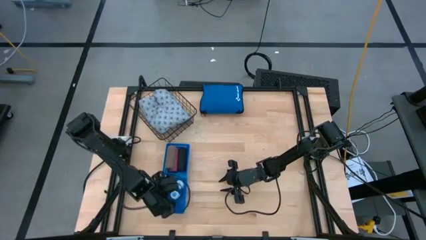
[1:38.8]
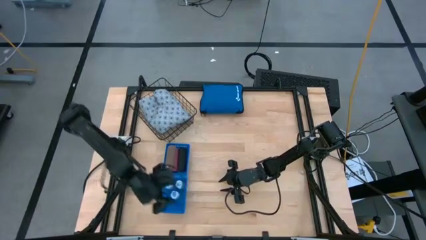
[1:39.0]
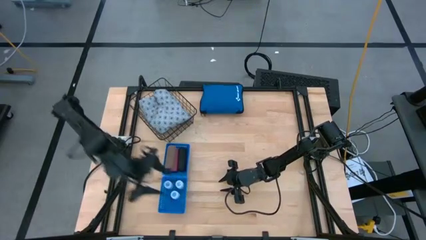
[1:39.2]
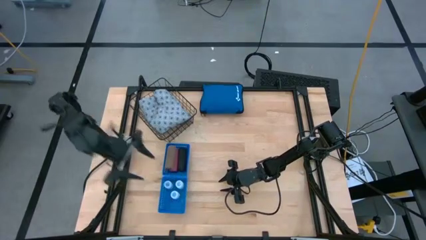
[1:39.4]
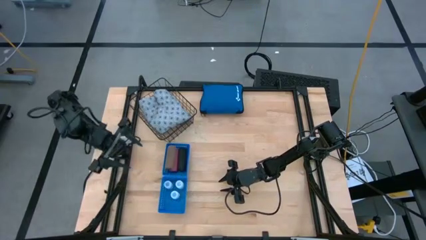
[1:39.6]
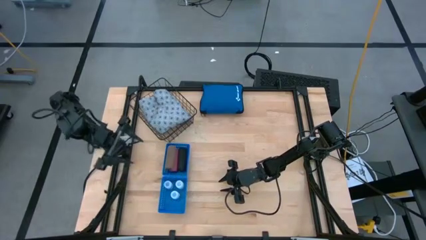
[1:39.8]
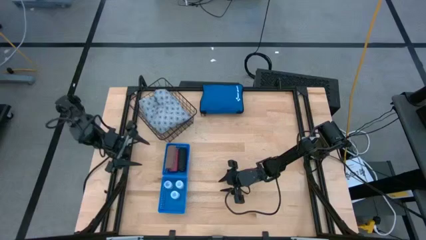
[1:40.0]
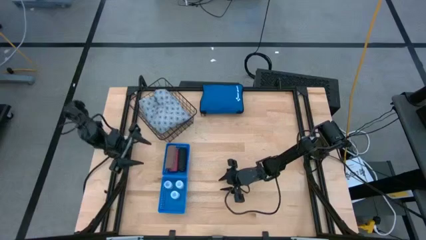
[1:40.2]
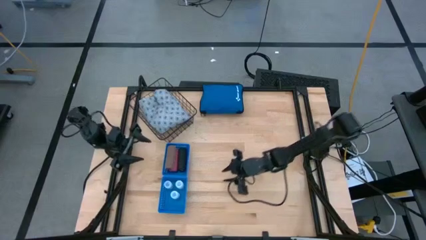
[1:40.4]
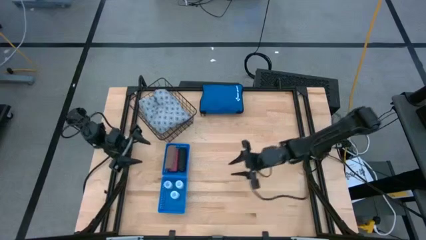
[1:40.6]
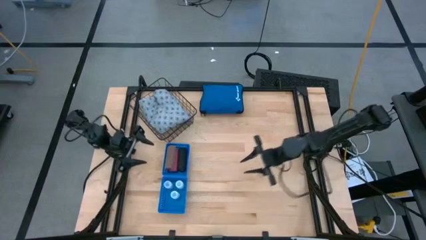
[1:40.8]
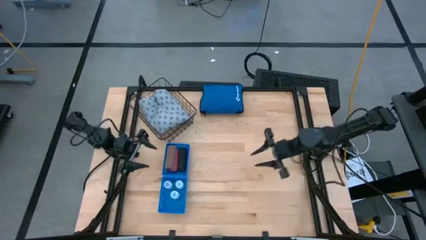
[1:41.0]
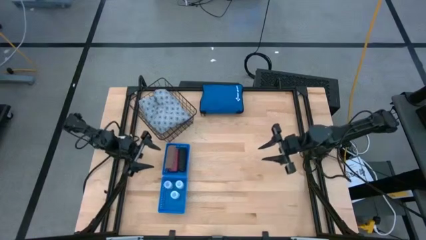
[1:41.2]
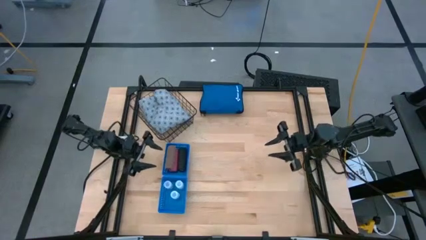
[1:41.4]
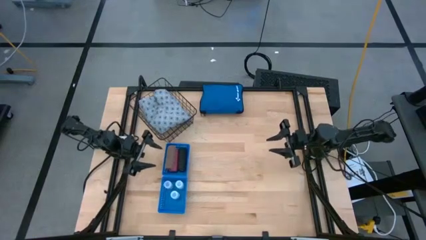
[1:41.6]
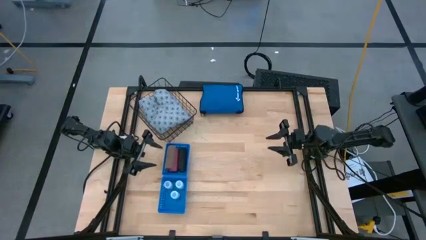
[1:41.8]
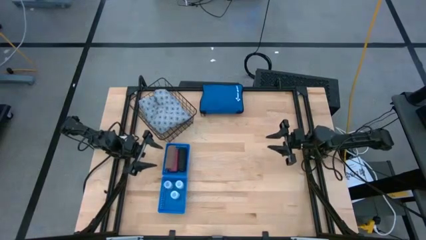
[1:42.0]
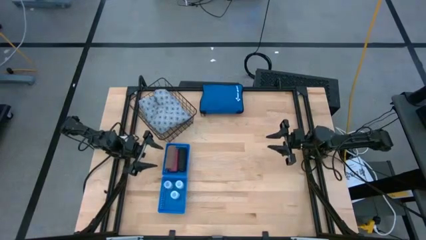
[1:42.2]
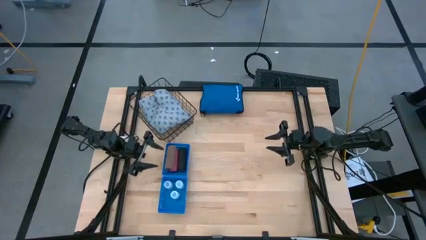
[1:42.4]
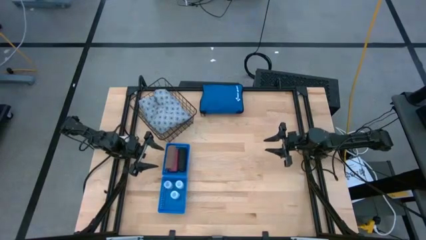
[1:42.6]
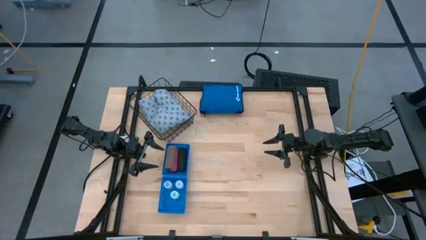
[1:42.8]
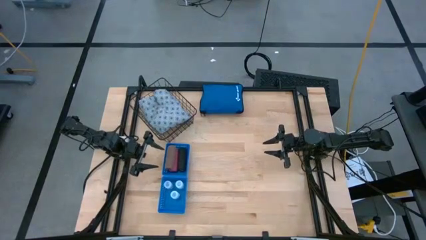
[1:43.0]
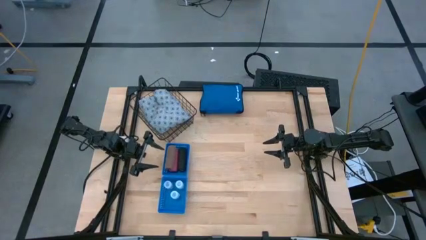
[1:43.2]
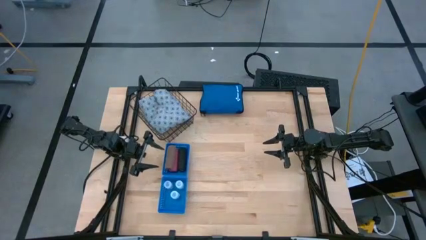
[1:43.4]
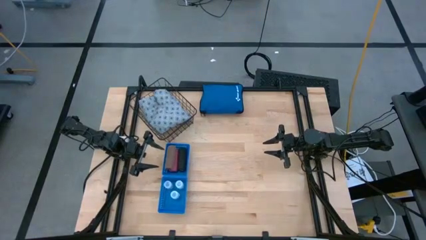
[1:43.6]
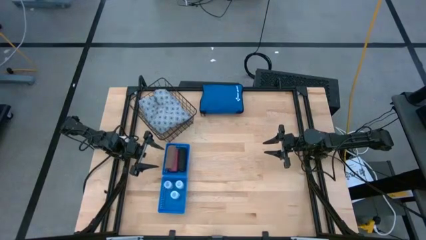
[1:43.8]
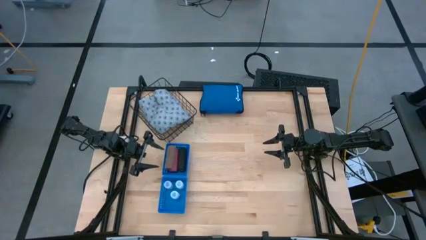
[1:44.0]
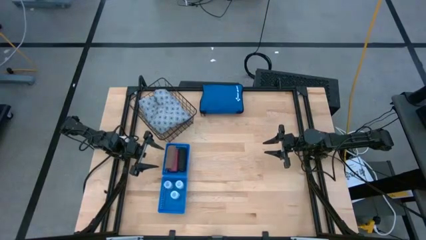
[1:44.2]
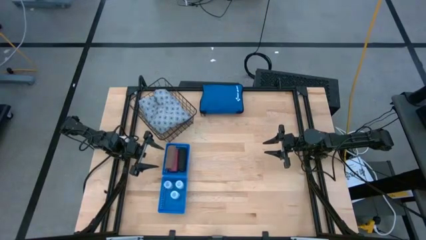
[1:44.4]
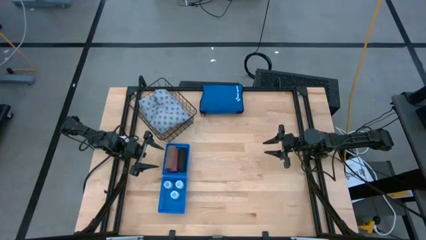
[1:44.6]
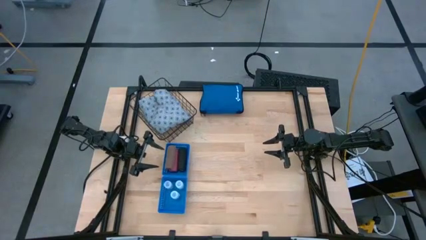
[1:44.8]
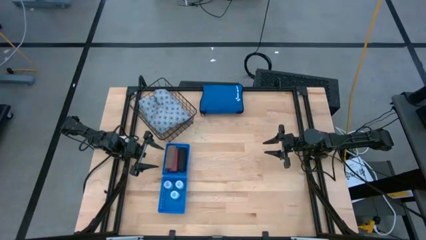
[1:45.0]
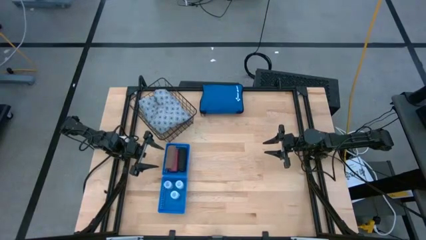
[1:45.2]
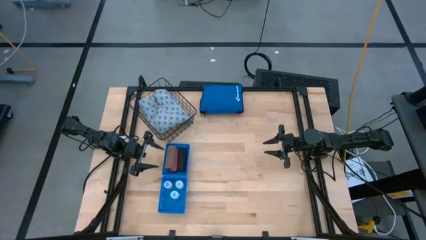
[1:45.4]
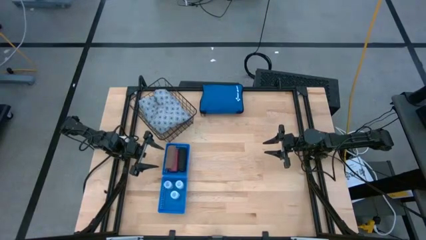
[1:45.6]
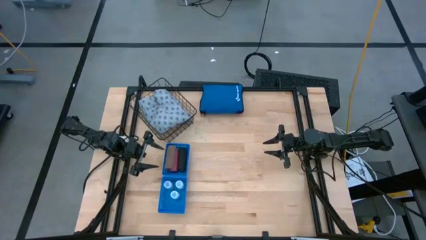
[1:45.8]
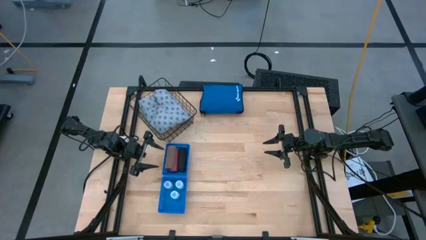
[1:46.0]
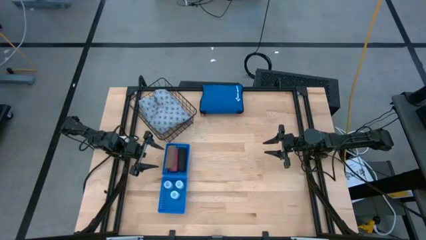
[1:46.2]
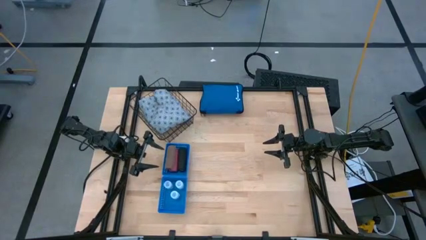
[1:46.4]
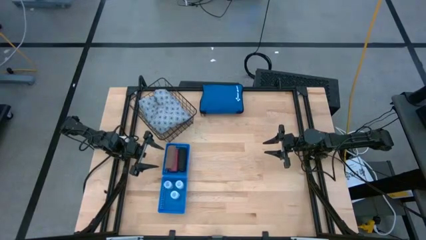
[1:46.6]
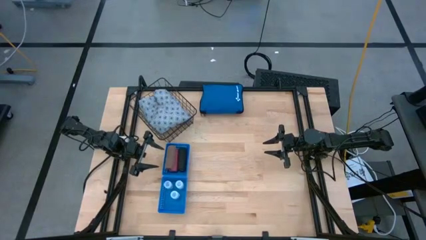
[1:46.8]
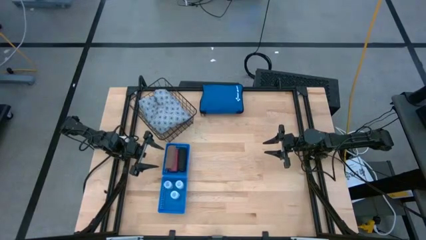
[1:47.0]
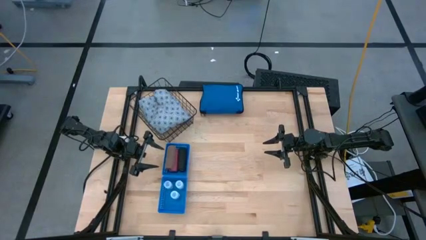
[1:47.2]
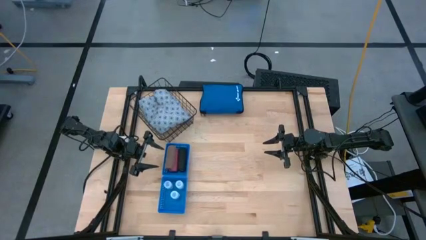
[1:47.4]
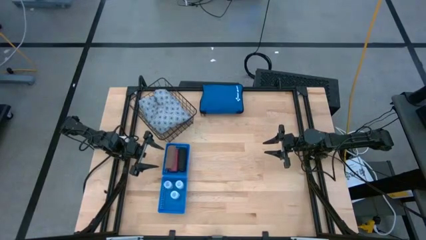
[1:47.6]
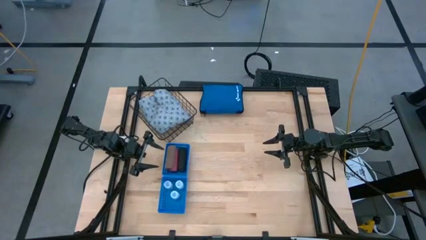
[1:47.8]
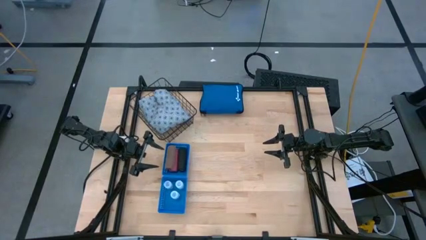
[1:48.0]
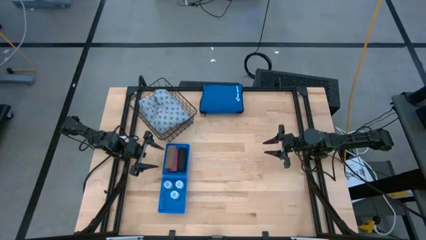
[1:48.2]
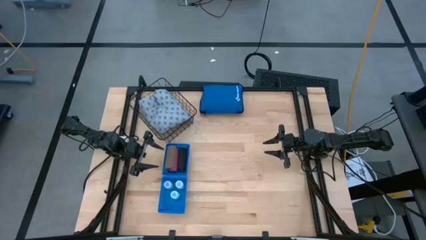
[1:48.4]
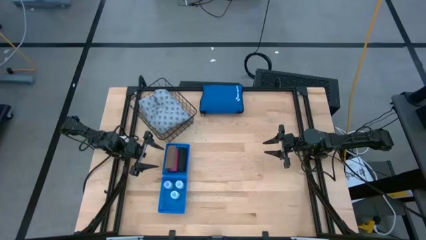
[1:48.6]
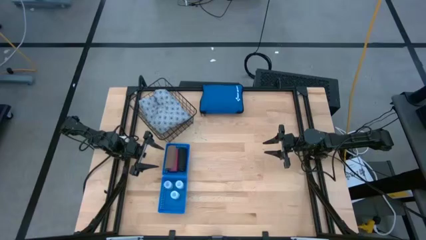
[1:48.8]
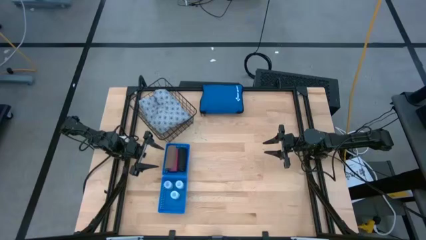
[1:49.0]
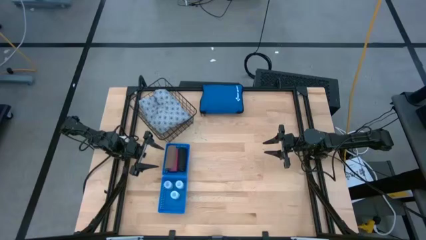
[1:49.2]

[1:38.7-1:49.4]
Task: Pick & place medical supplies in basket/bin
Return to Home Position
